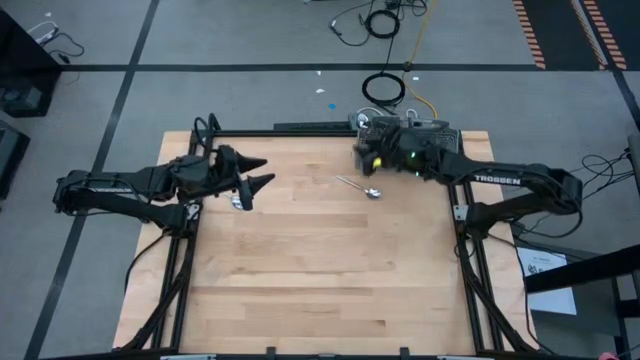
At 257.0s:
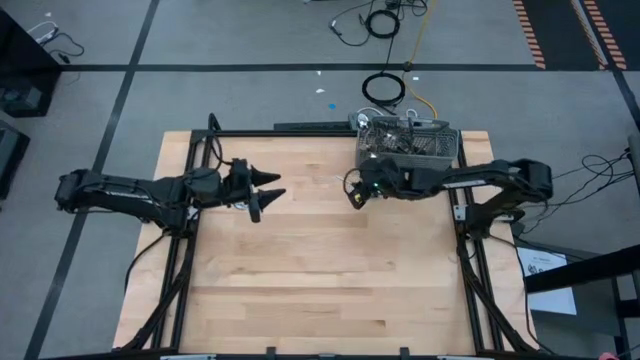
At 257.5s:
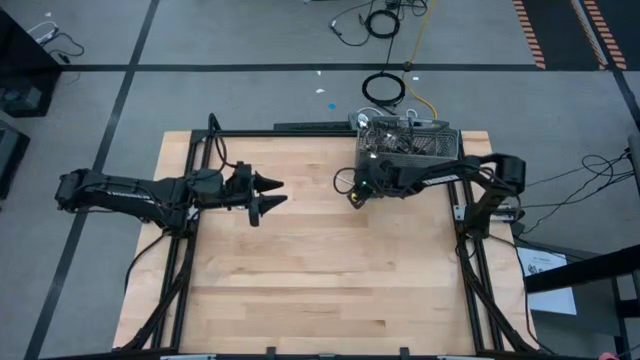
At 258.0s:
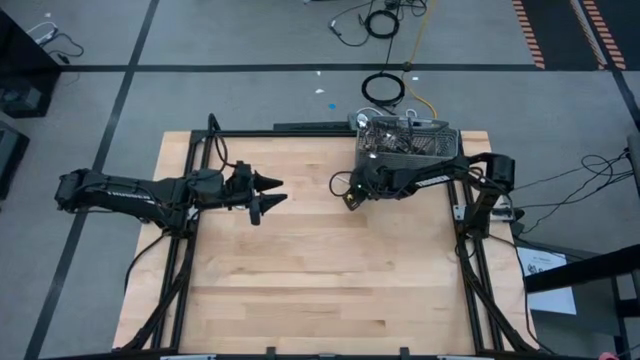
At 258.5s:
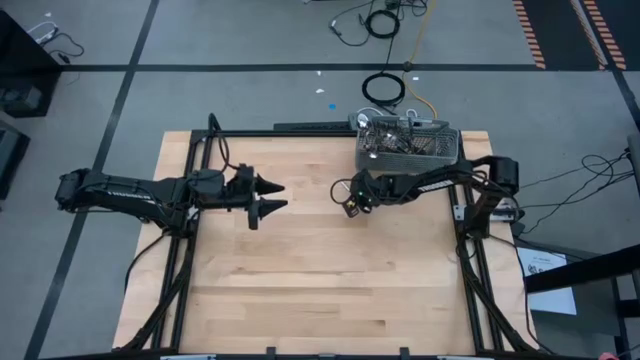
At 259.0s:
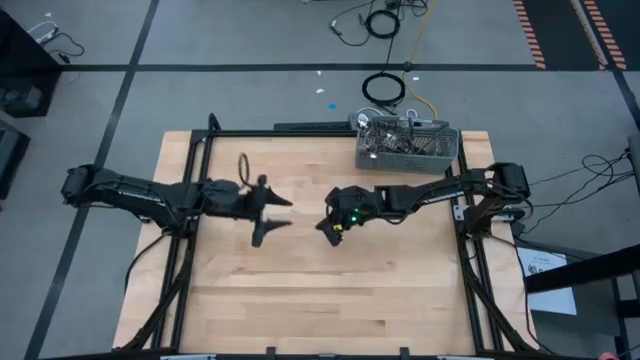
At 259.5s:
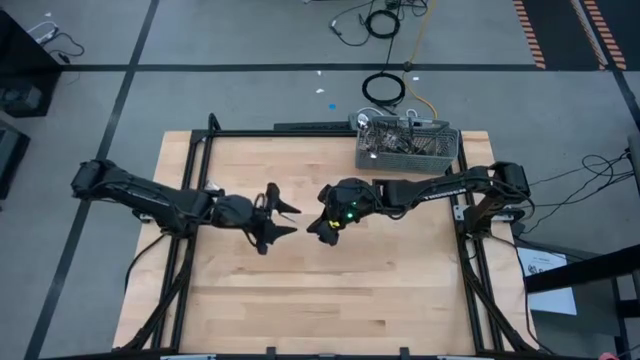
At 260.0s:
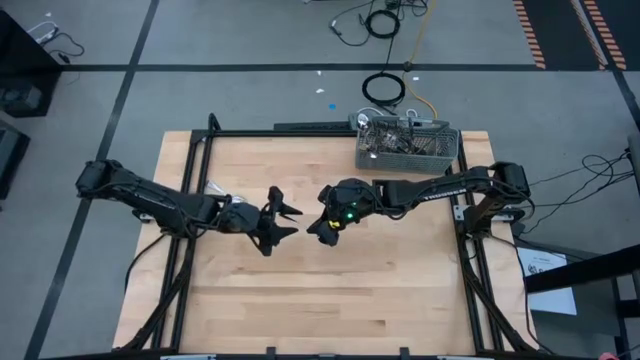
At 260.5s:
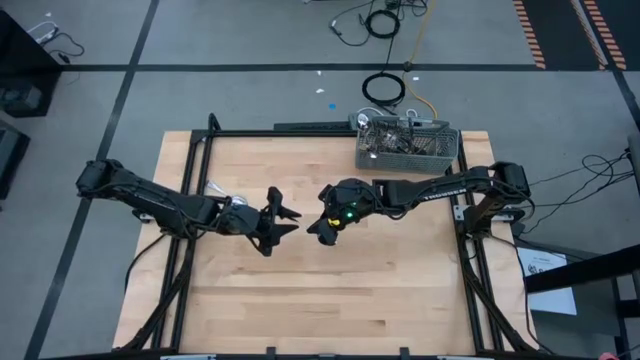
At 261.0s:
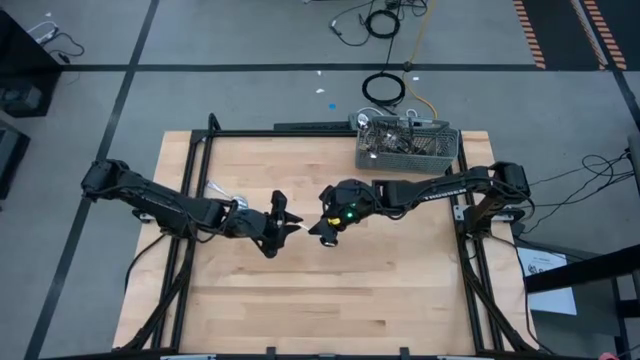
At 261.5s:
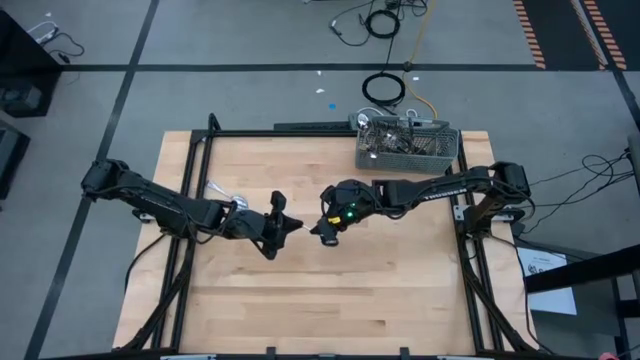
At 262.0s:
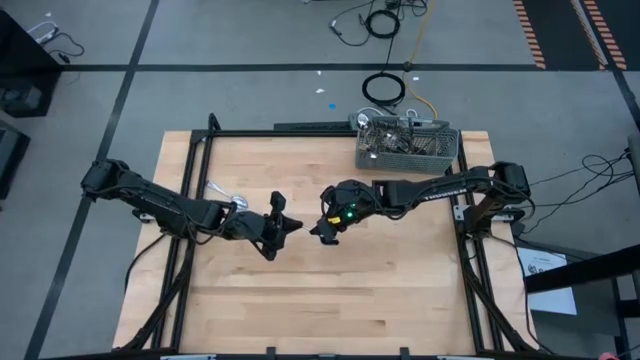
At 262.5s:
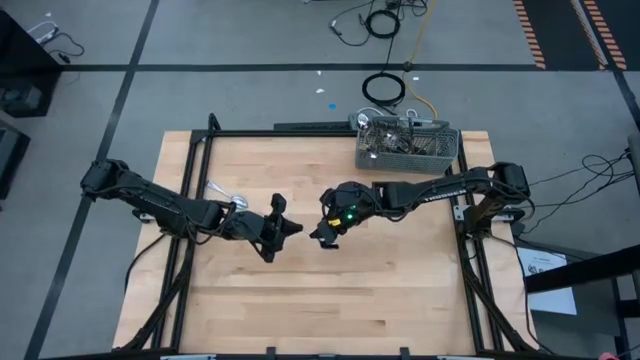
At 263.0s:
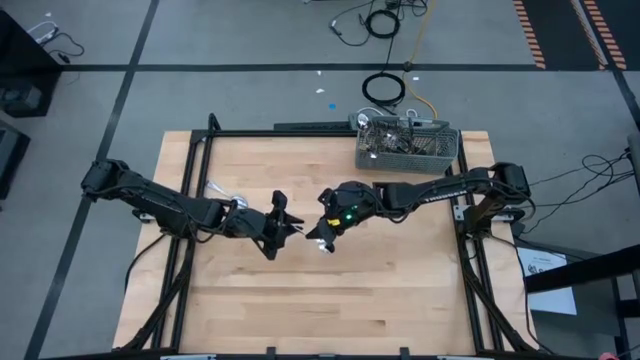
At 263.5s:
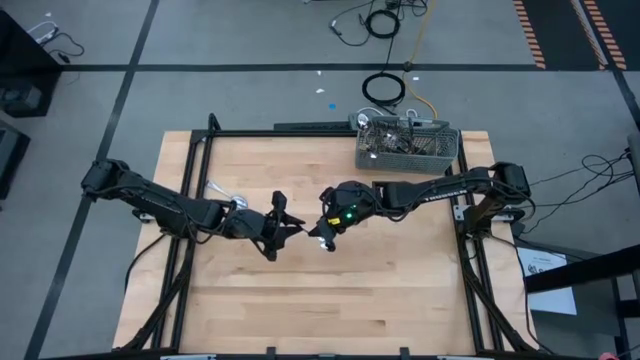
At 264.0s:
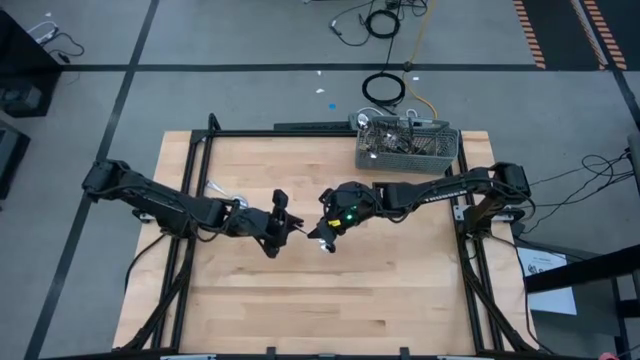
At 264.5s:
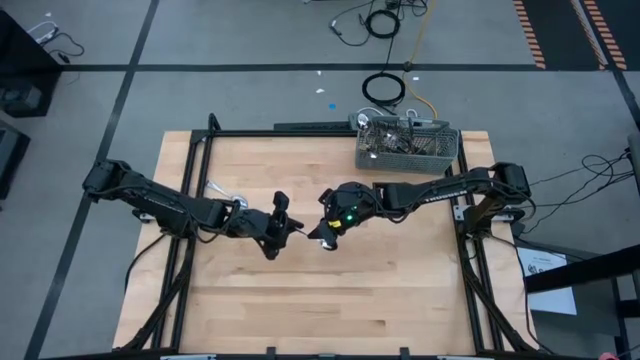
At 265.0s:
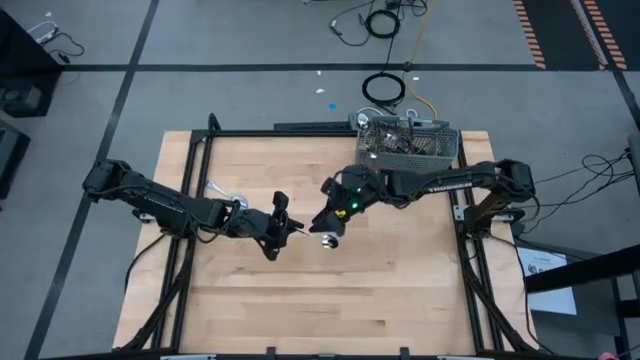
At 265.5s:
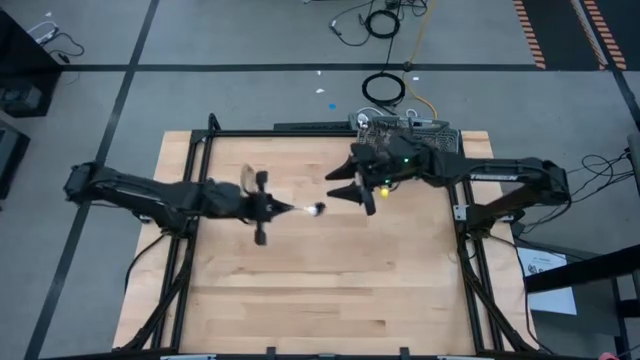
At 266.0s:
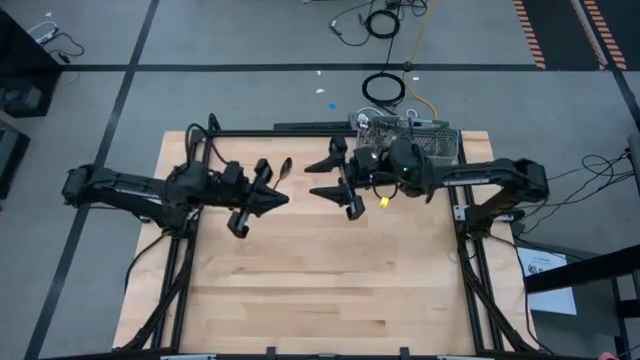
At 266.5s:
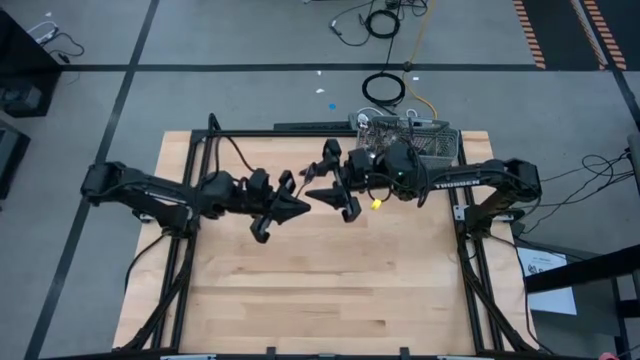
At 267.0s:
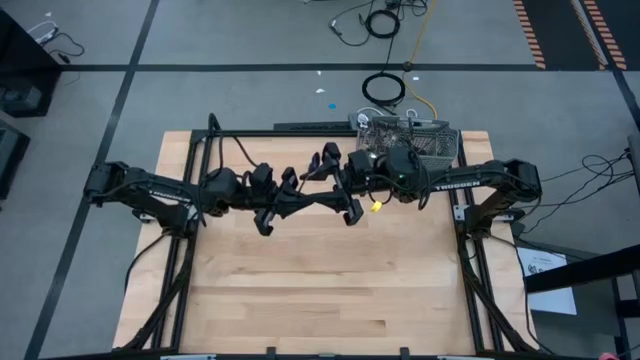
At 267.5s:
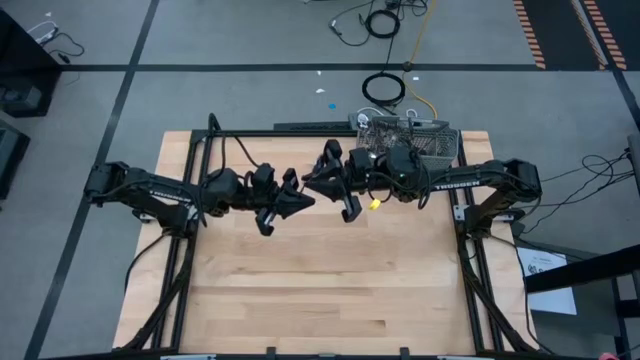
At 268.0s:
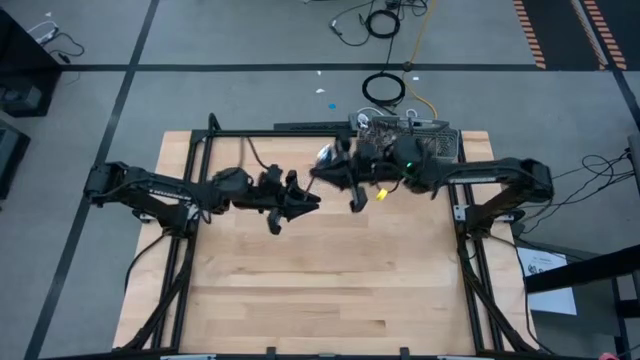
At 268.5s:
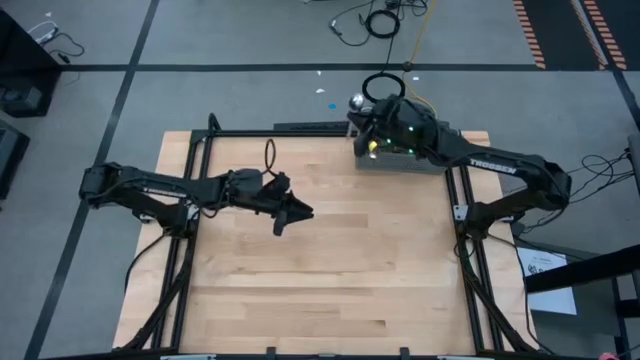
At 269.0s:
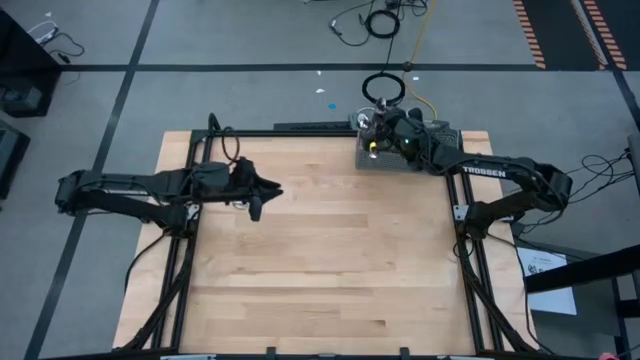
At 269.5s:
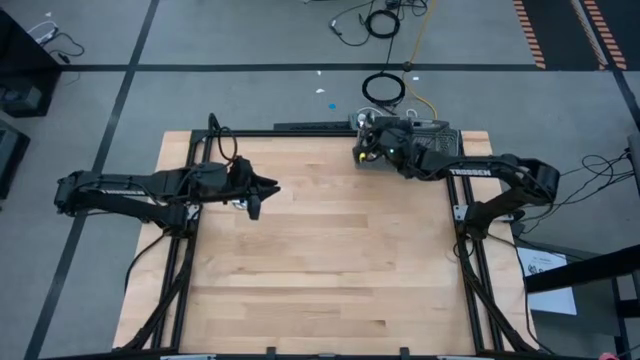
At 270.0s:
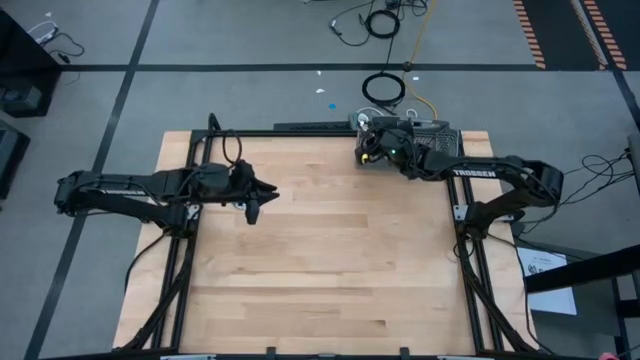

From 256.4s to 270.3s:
Task: Sort silverware
Put the silver spoon into the gray utensil holder

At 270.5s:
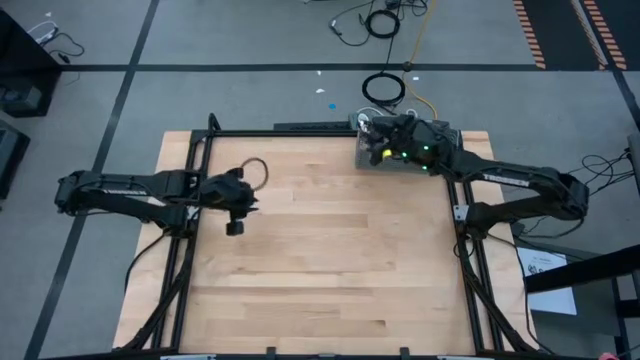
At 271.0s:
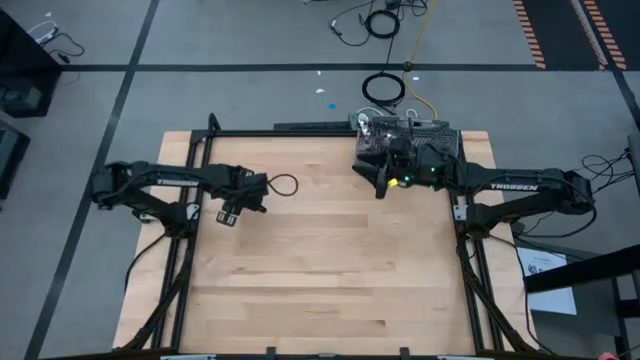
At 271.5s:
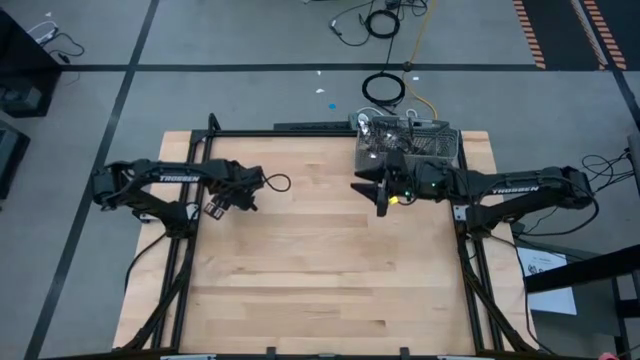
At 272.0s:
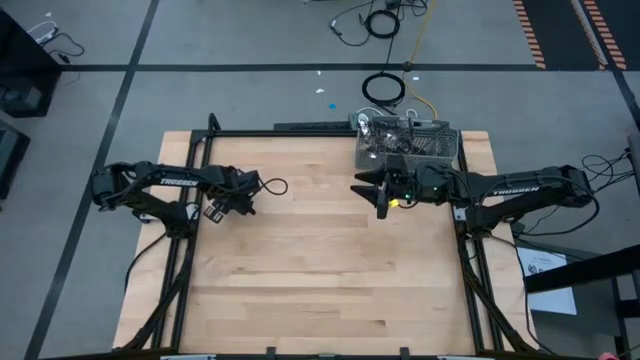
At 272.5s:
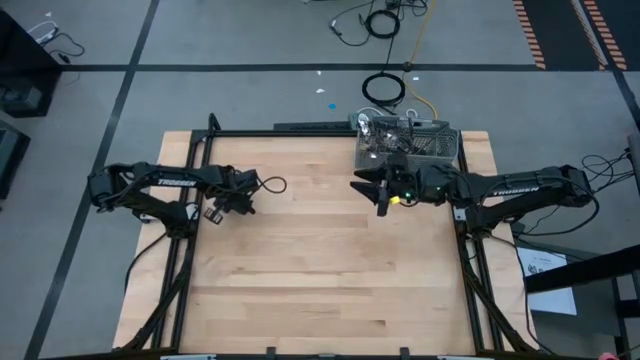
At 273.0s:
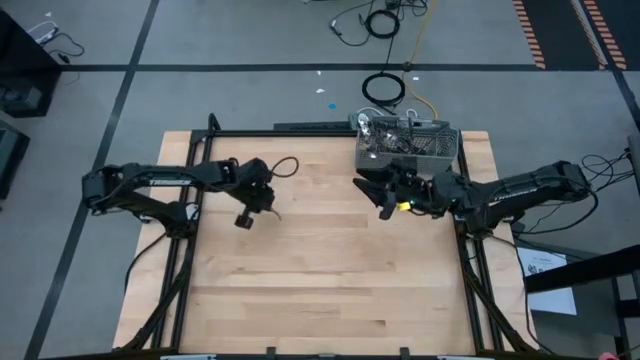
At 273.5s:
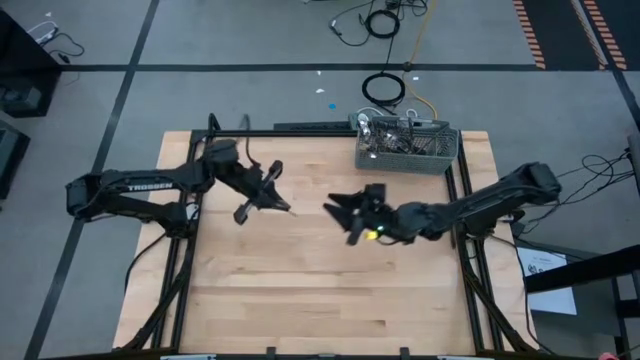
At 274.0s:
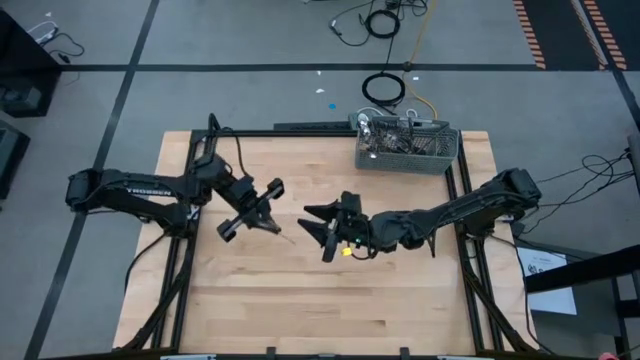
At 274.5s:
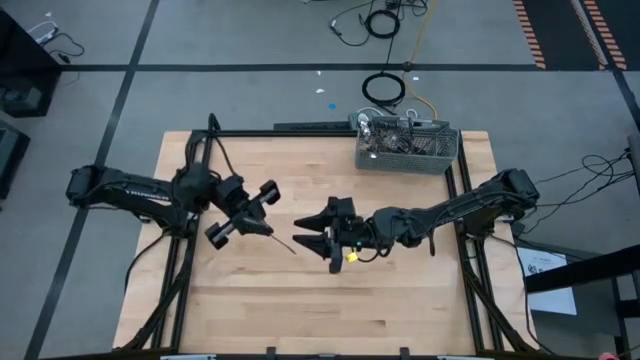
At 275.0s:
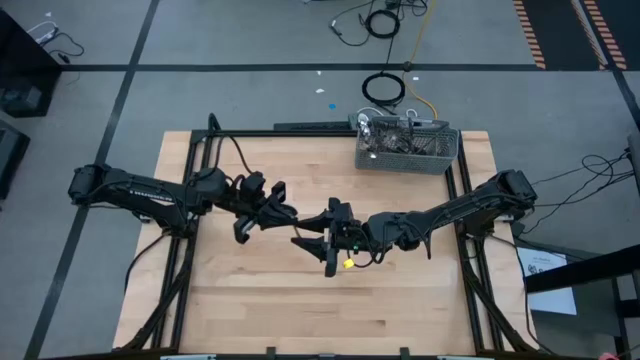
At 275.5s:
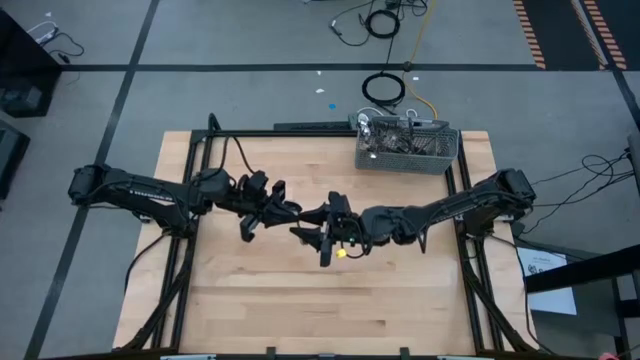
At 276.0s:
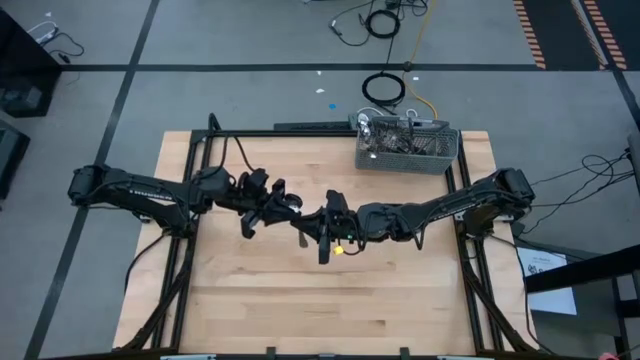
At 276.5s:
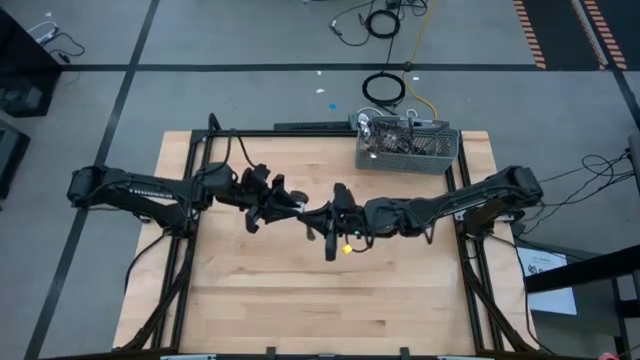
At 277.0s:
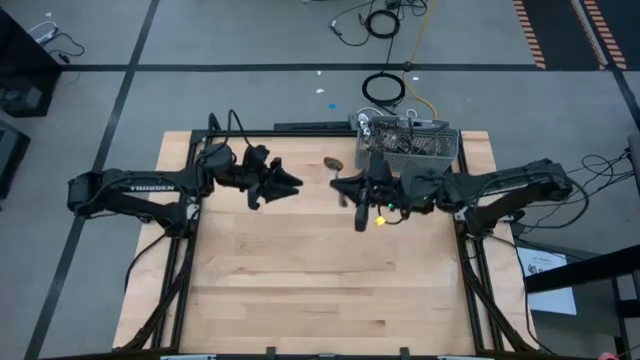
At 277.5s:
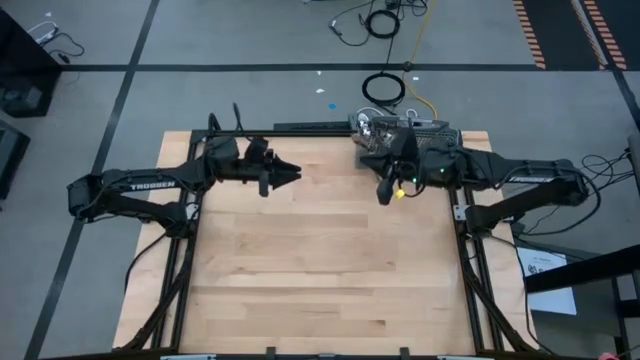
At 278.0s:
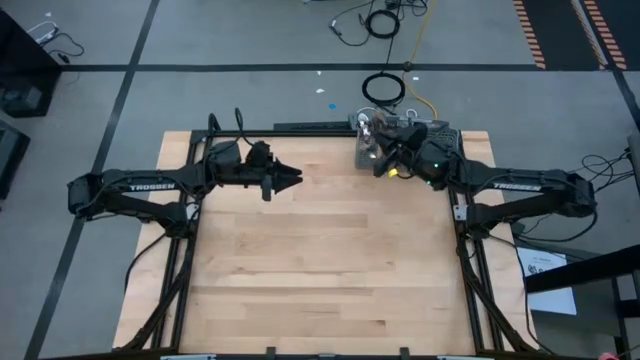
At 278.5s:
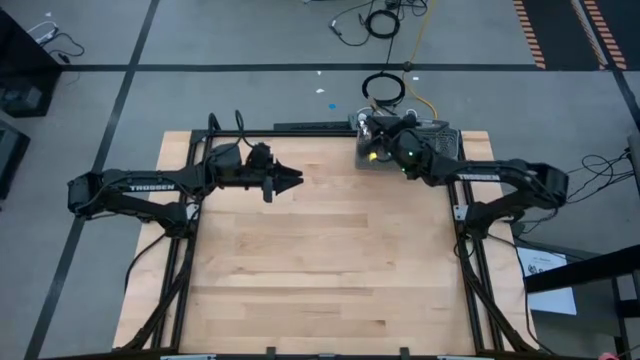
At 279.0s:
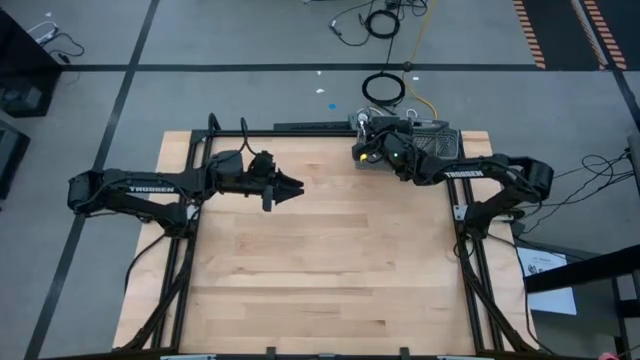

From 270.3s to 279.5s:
Put the silver spoon into the gray utensil holder
